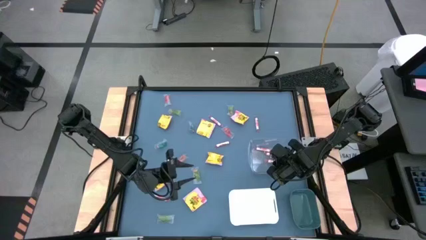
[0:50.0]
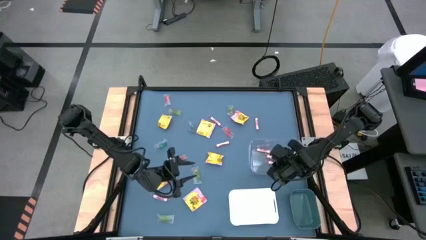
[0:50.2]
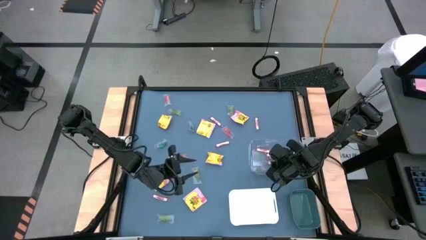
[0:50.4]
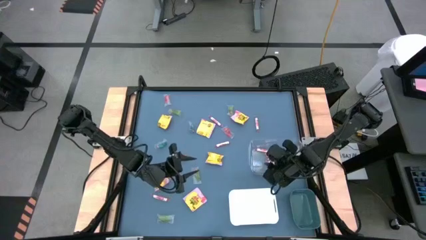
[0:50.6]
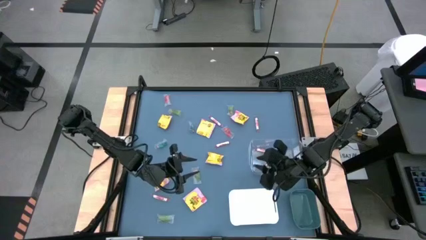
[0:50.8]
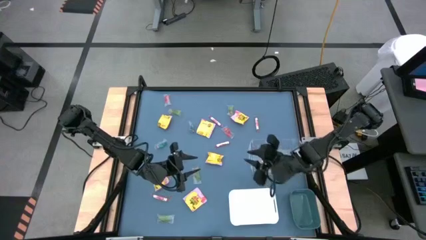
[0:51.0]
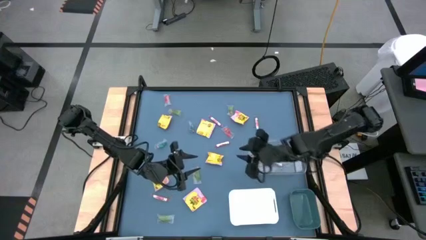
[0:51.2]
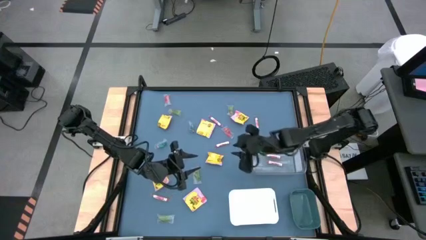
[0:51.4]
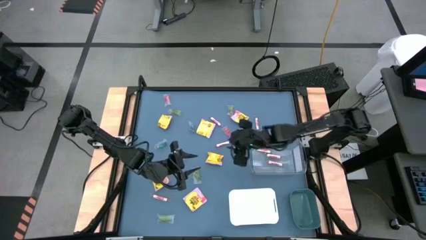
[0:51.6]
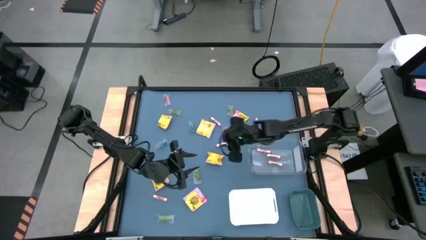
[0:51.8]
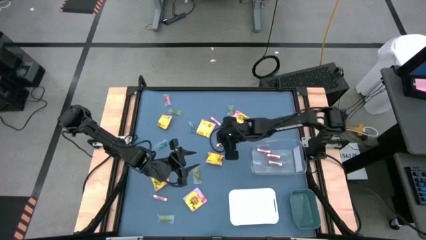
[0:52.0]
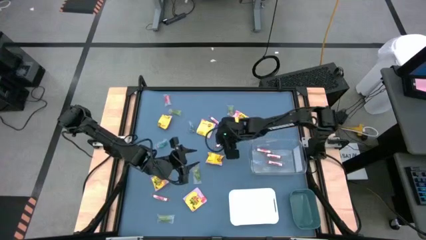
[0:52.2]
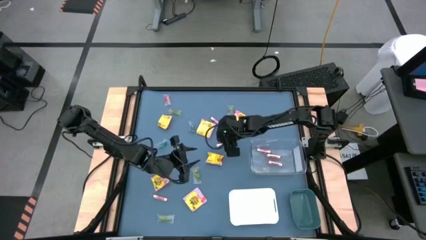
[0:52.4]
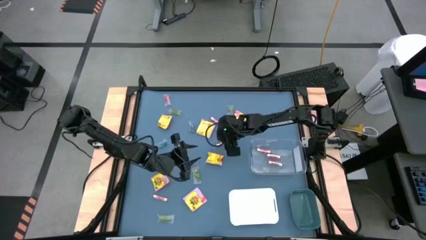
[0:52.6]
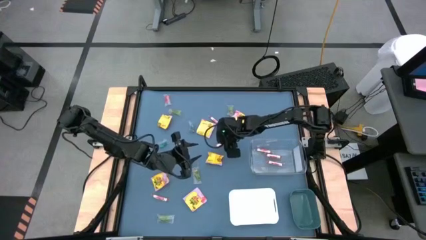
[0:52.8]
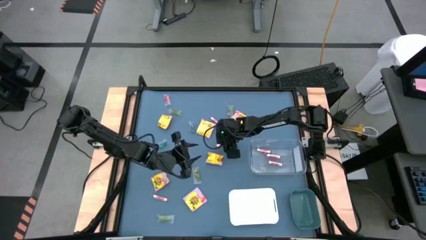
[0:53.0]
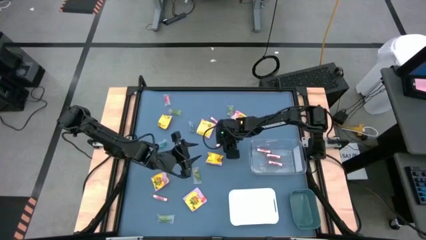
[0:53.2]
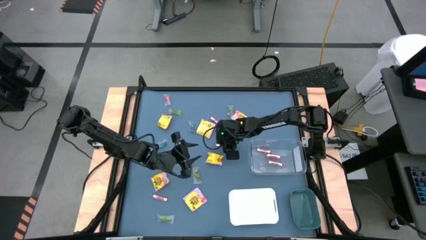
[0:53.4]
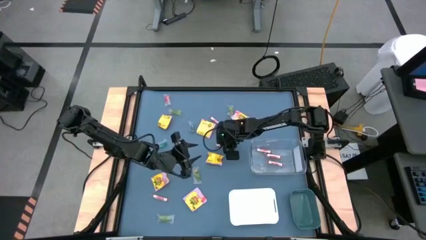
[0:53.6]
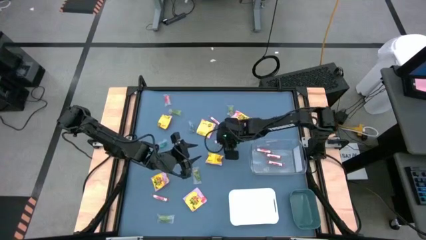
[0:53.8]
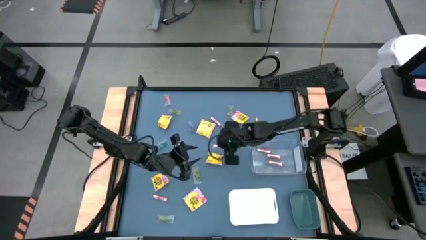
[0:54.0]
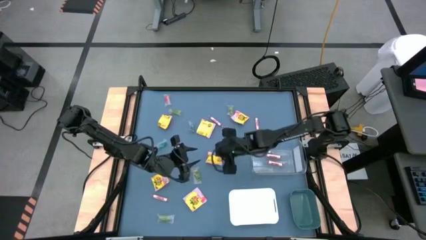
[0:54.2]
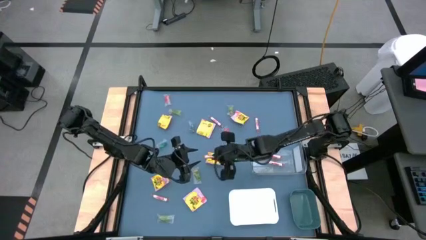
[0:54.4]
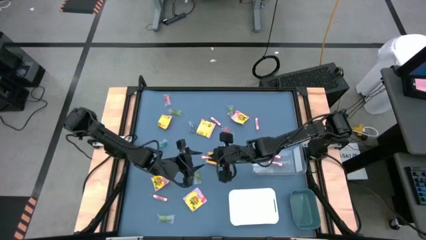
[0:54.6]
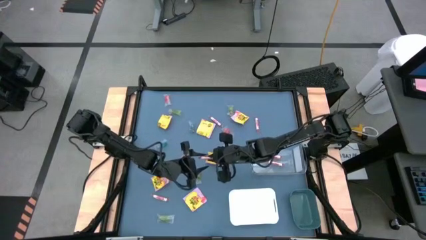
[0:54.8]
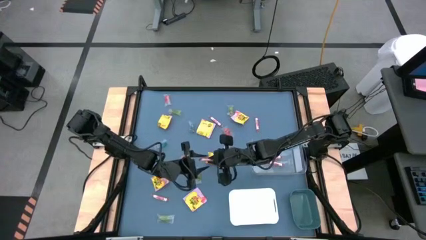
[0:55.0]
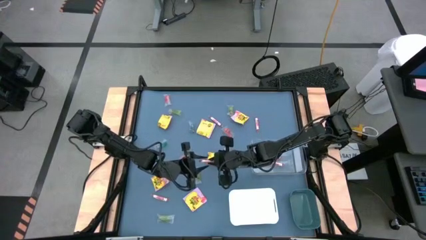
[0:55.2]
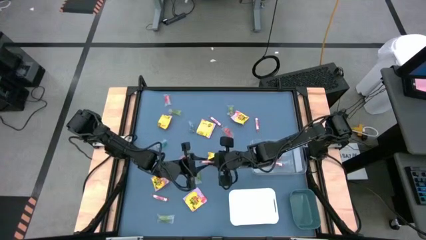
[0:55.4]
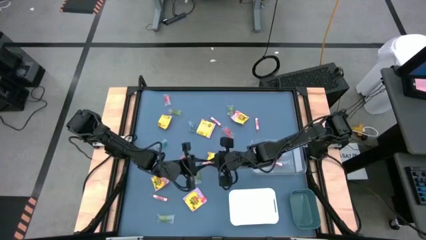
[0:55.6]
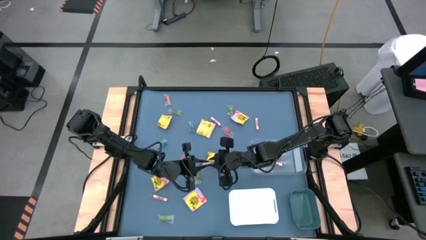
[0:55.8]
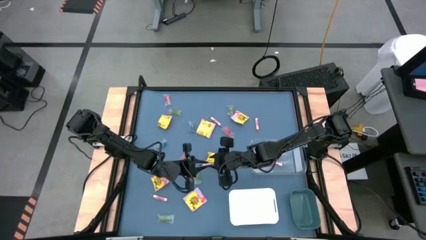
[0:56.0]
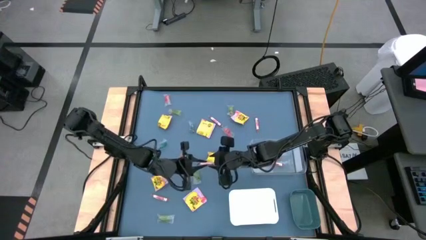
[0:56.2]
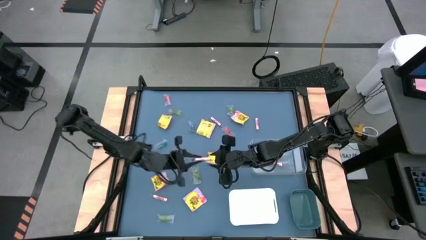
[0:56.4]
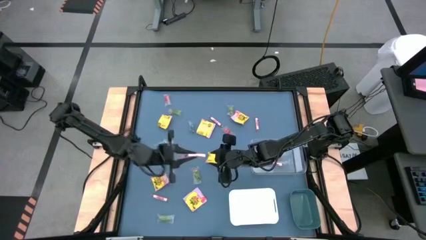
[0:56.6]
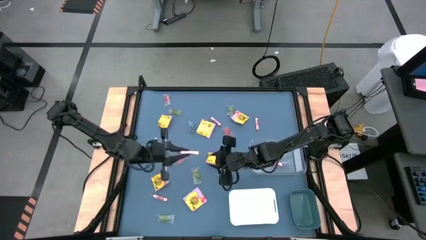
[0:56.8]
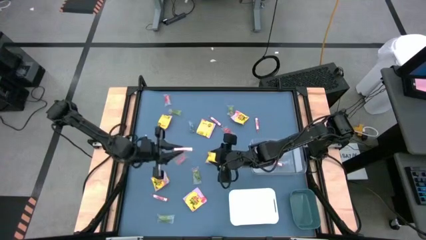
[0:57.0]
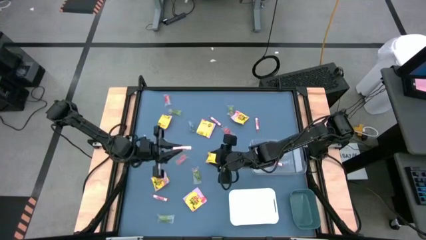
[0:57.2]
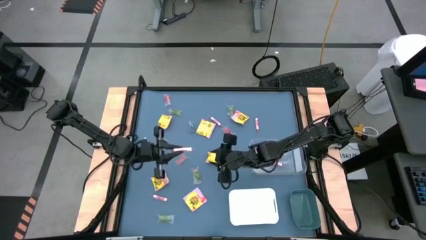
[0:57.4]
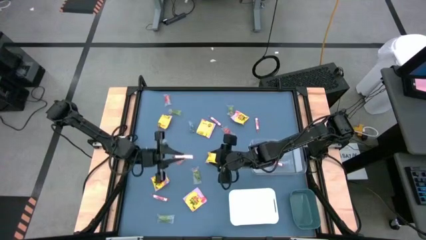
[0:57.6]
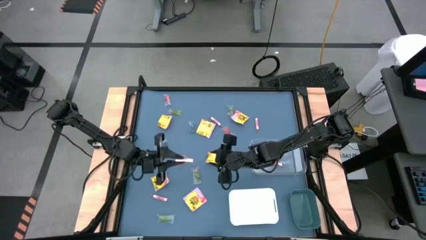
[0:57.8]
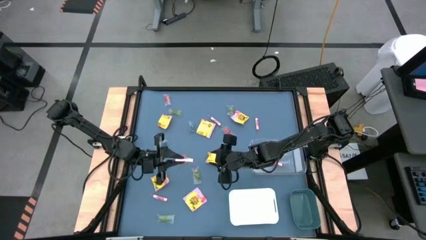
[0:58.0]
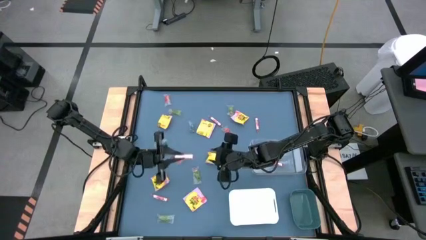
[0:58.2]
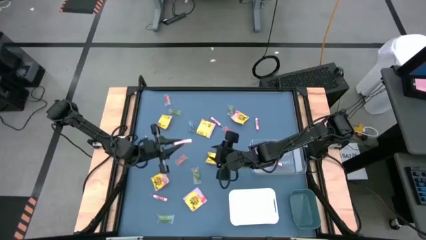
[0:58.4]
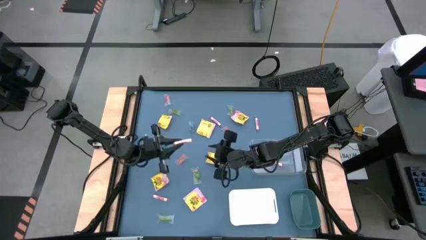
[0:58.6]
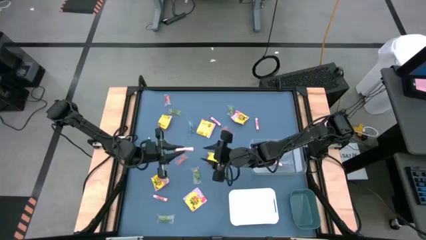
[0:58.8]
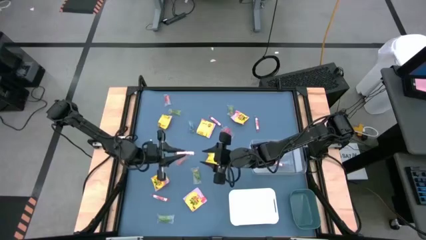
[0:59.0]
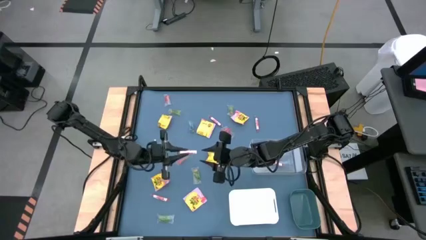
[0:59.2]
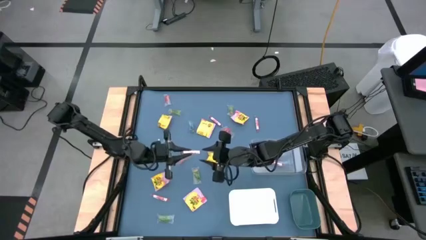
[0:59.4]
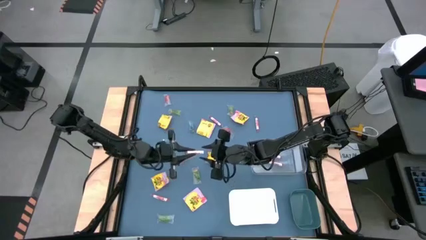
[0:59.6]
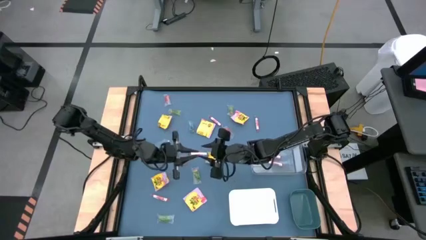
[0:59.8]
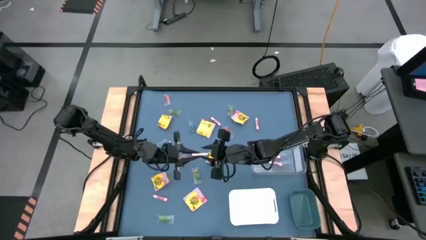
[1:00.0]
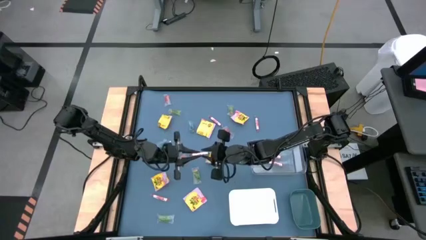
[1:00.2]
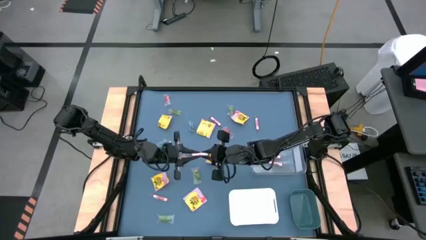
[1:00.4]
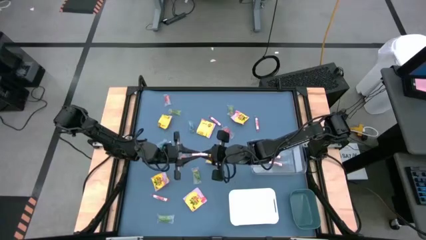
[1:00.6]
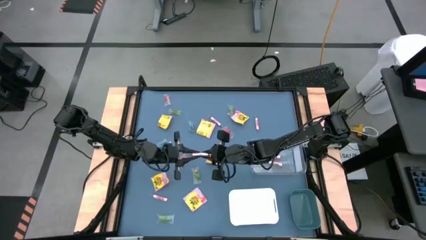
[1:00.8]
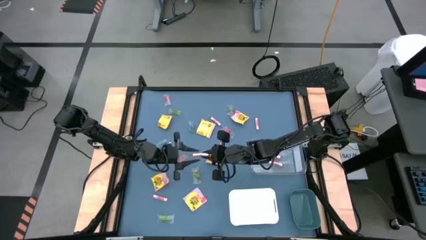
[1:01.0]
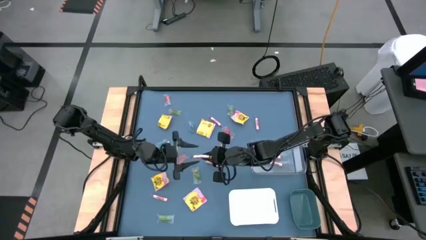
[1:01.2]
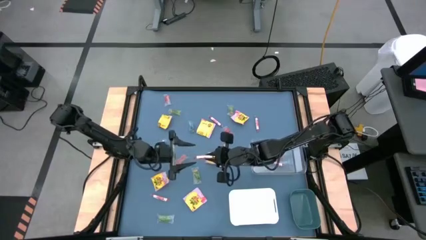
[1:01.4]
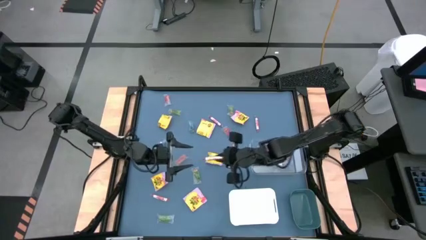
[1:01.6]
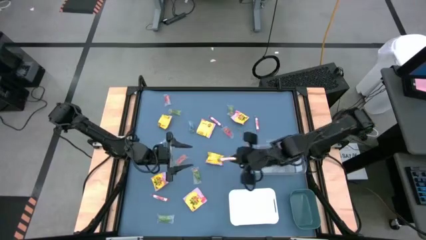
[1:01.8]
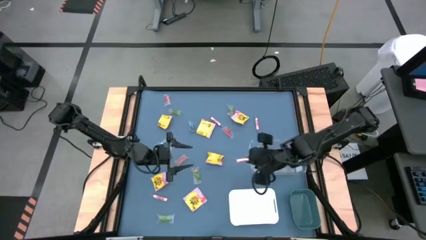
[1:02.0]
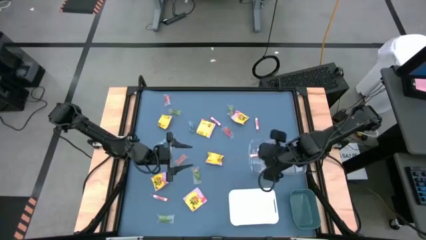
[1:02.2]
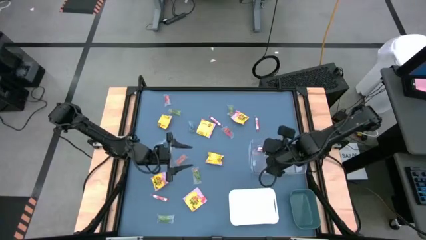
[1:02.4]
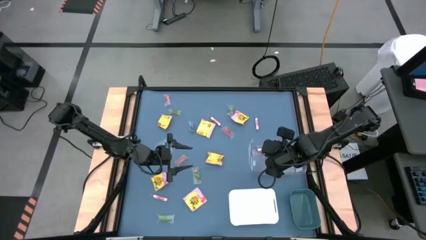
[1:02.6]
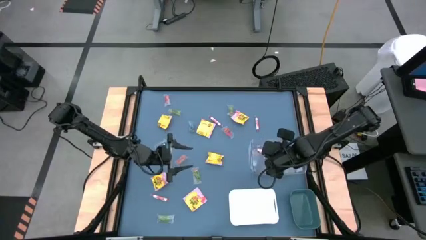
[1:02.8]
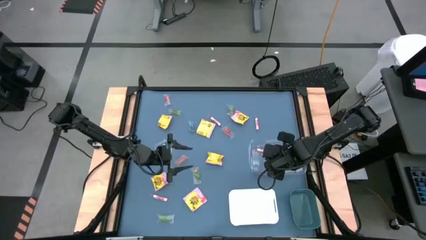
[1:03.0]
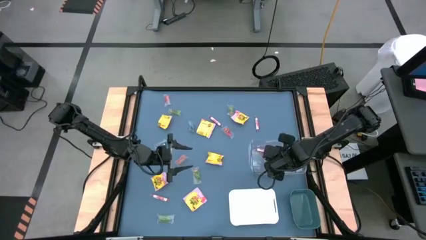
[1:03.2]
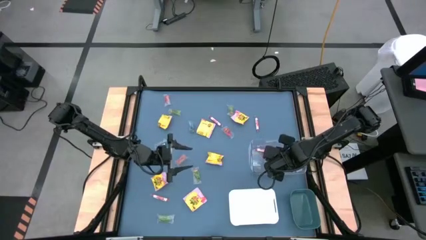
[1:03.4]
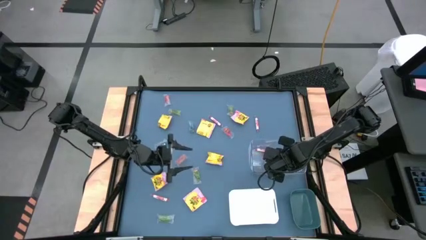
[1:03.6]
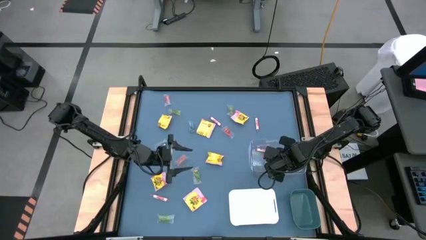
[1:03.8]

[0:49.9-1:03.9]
Task: Sort candy
Put the transparent candy roll into the transparent bin

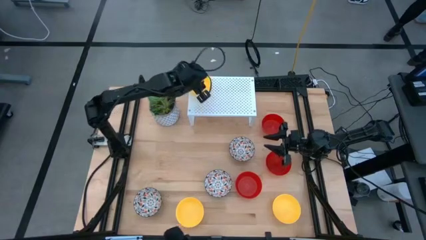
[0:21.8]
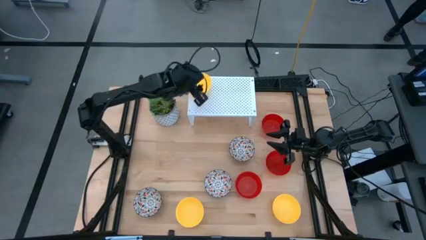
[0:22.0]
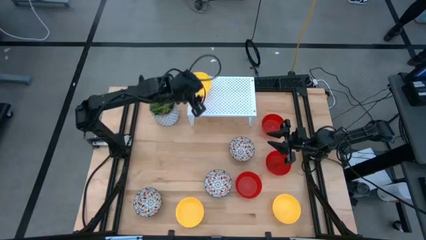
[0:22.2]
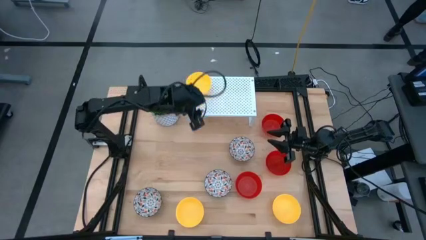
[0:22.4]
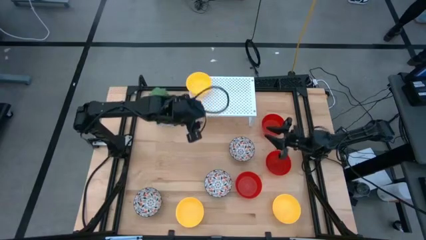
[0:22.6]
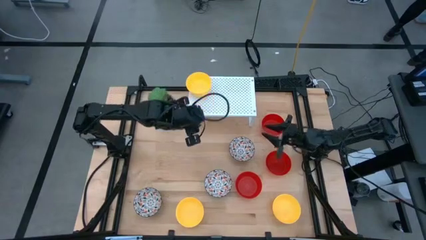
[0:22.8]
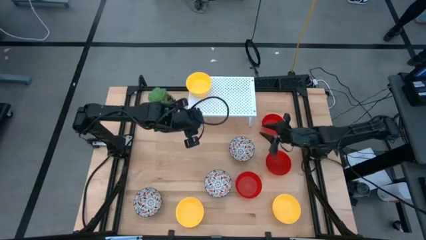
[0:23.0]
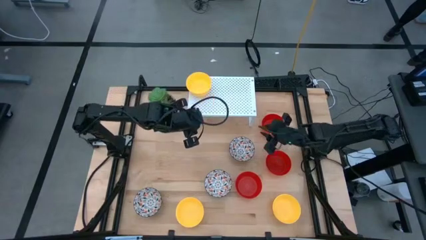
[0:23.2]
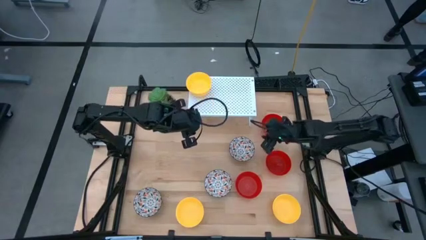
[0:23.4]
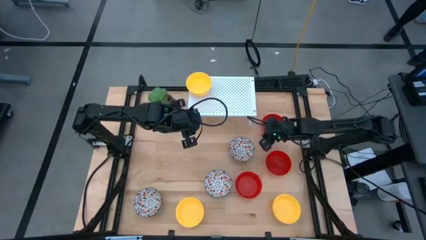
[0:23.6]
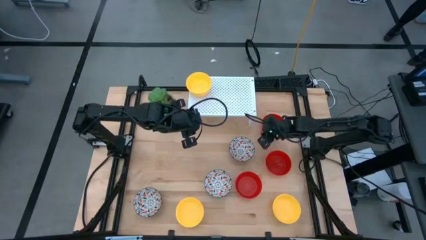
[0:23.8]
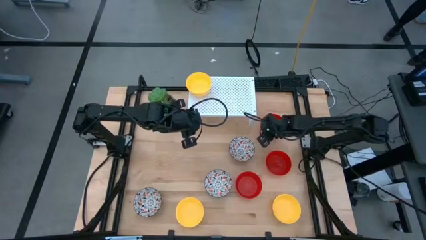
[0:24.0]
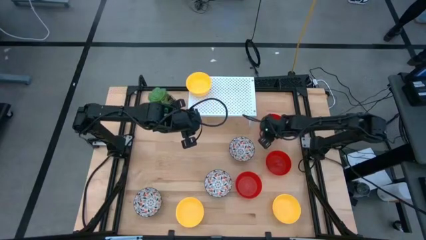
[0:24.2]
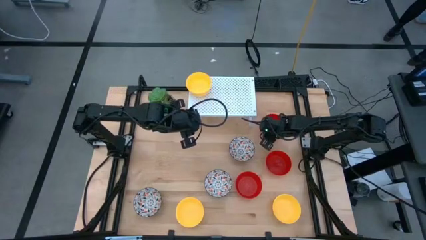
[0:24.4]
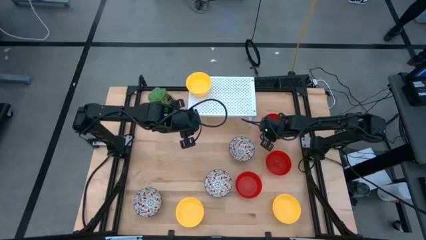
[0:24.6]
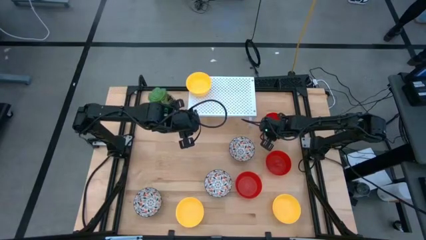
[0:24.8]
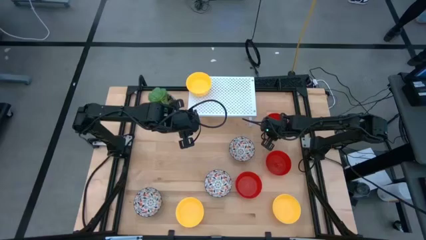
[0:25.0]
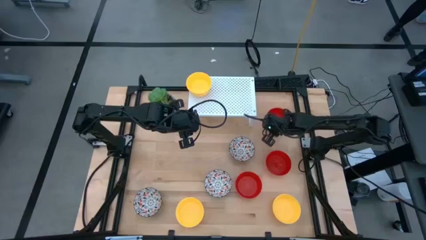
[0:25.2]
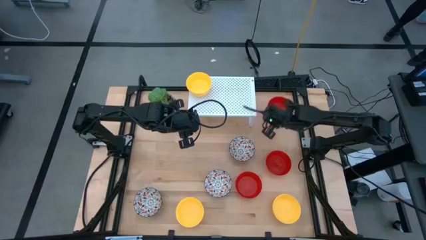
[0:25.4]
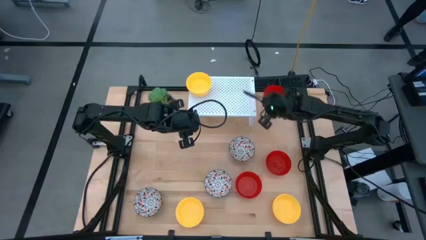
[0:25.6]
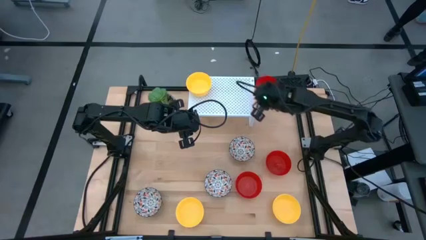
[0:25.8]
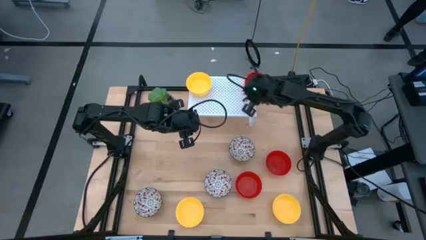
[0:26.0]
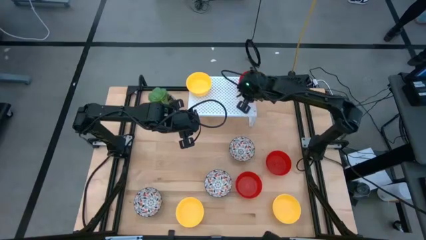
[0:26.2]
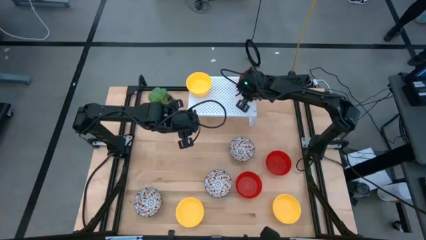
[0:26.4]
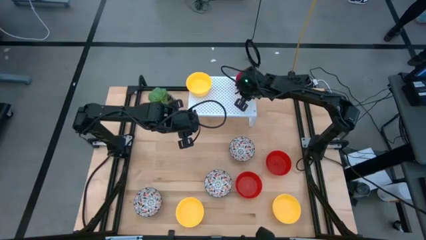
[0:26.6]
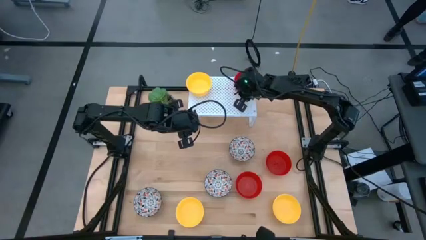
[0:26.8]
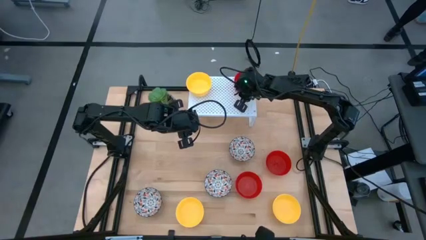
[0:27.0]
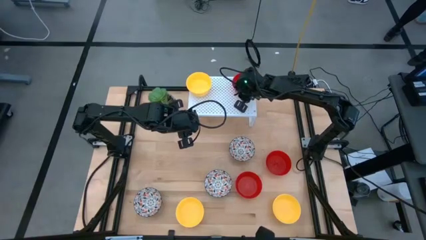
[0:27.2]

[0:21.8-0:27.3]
Task: Pick & Place Mini bowls
Put the red bowl on the shelf
